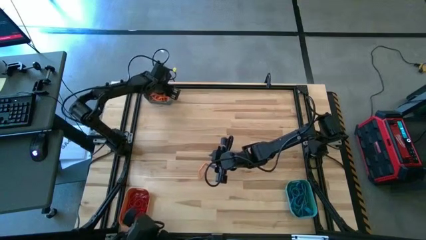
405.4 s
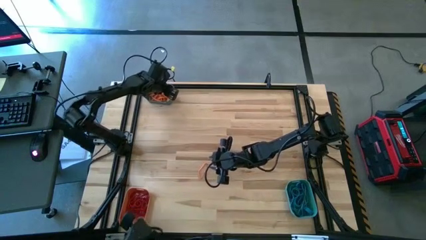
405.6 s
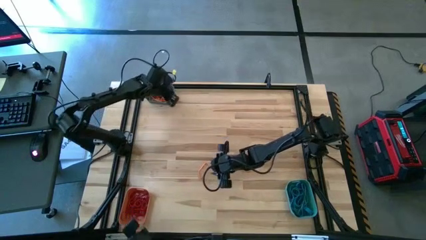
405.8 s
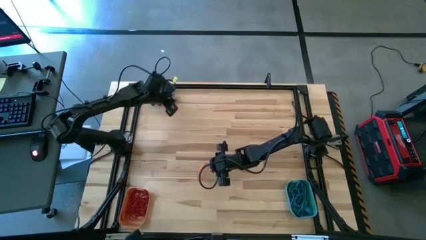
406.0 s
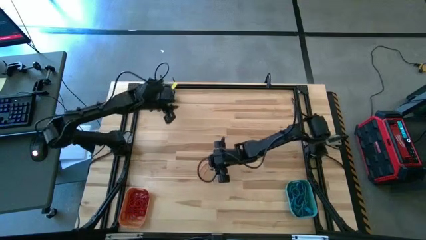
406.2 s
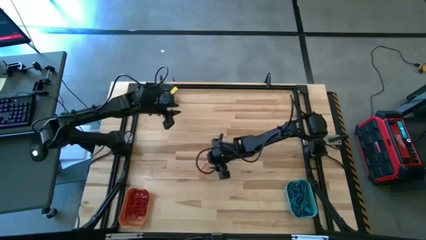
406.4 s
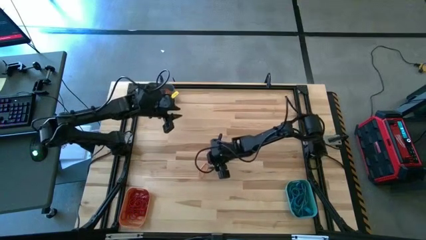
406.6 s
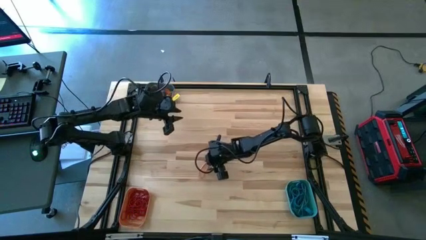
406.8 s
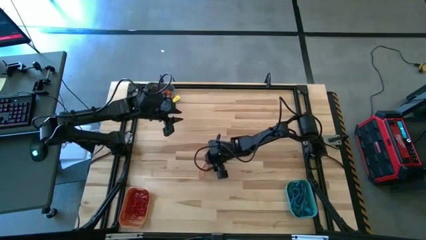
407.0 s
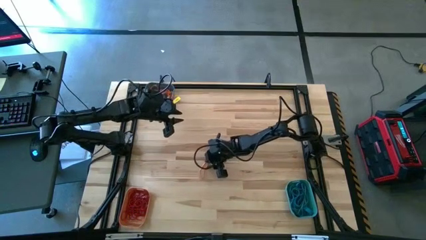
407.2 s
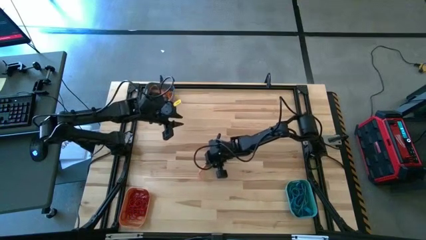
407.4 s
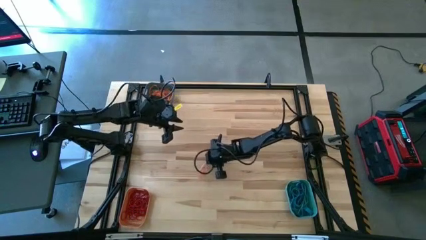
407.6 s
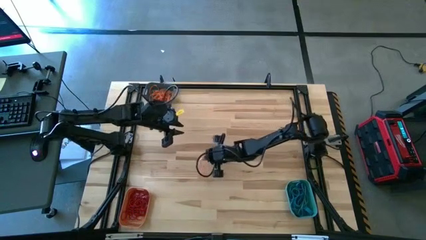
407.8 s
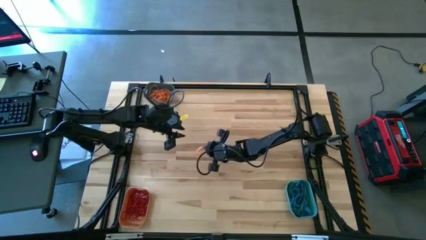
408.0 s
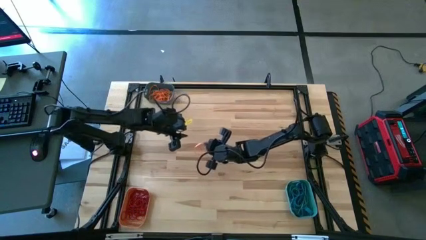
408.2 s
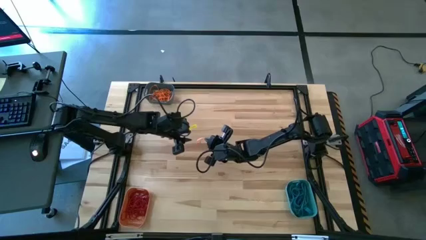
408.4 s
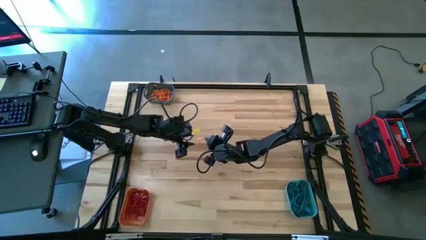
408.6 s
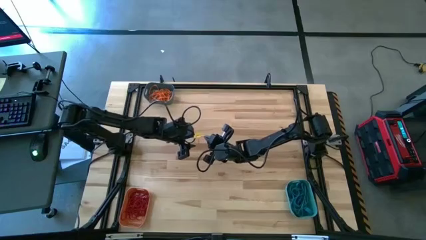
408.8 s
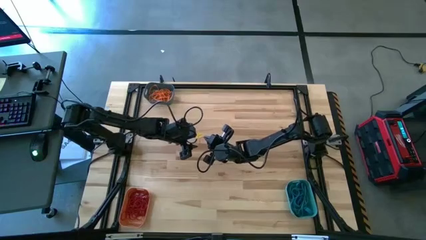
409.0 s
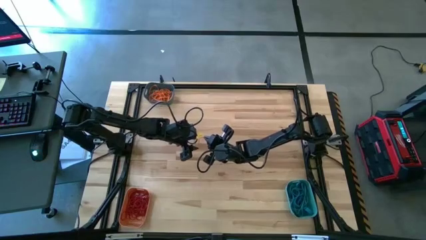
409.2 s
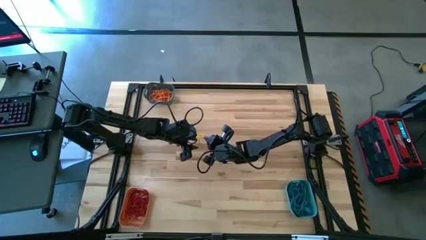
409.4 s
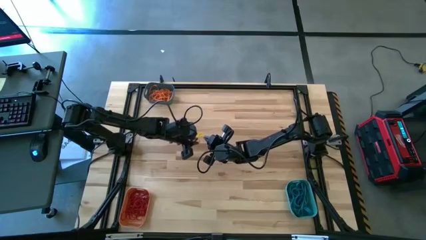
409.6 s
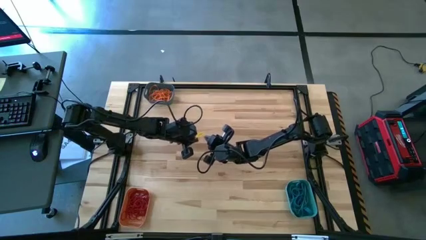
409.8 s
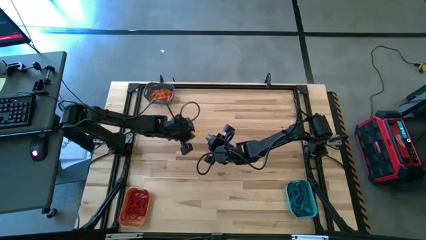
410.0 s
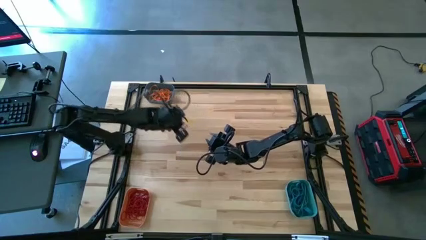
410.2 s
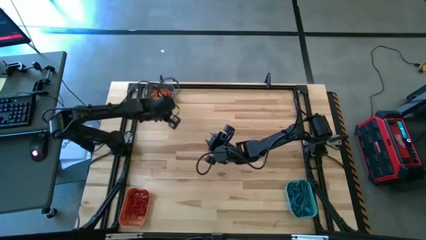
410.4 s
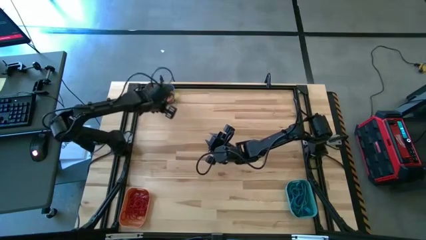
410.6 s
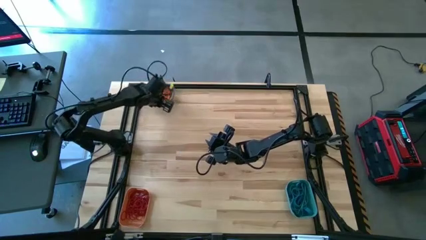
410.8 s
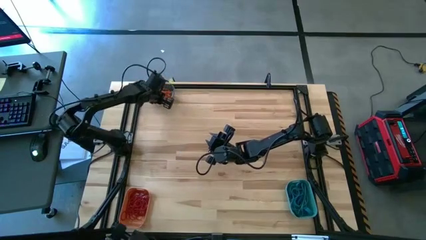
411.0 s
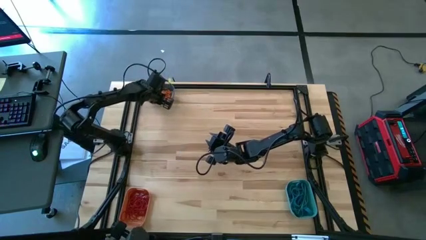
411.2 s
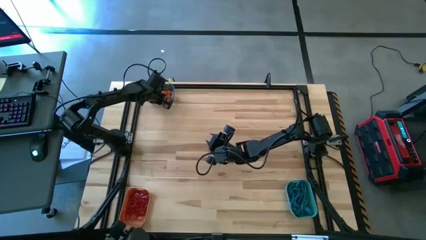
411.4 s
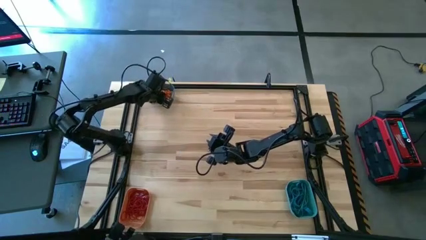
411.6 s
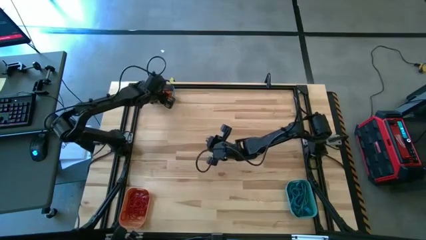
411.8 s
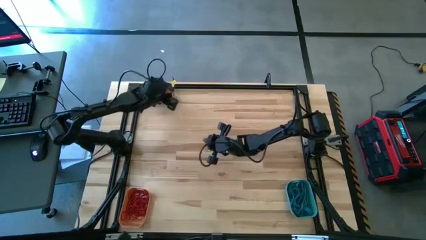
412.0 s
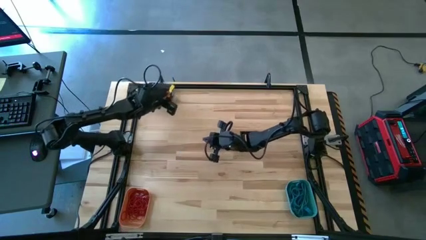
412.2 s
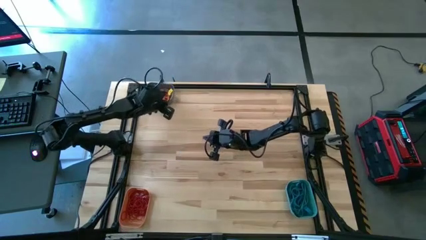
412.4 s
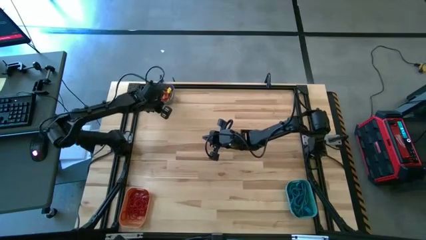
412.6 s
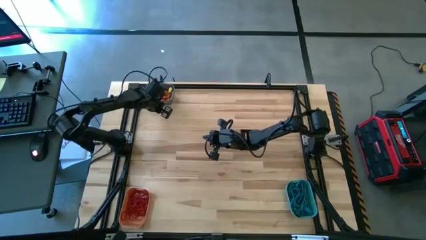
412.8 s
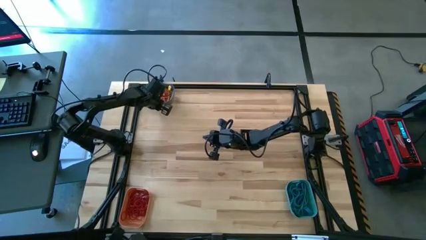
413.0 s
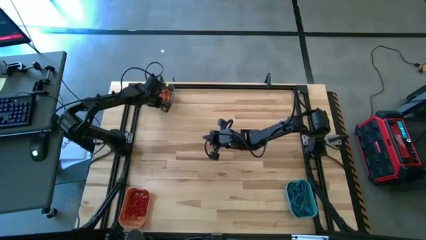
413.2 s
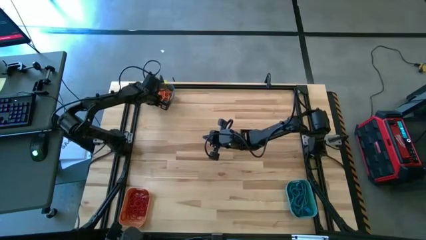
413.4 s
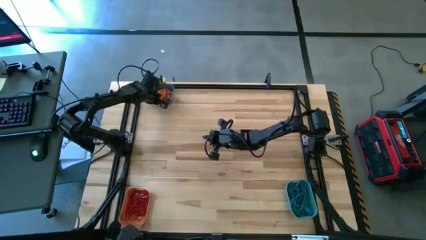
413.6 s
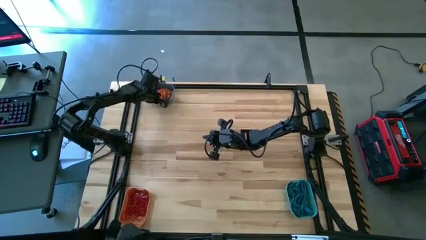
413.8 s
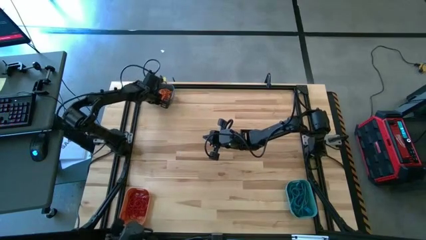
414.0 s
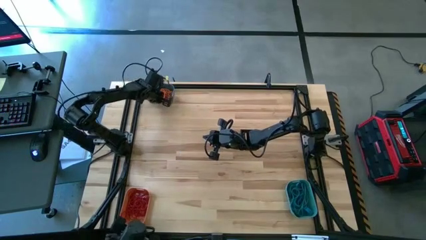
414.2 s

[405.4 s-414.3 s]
Task: Sort rubber bands into baskets
Put the orange rubber band into the blue bin

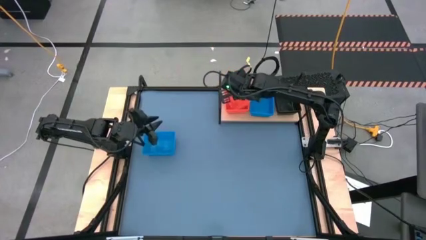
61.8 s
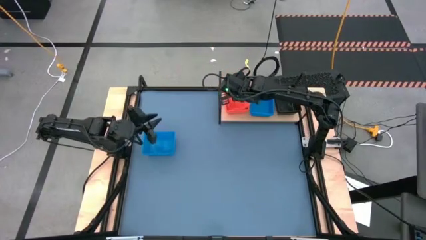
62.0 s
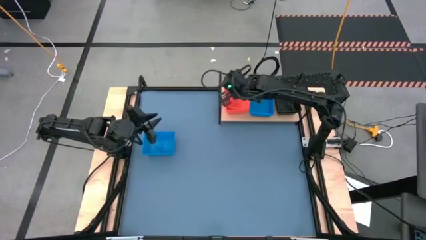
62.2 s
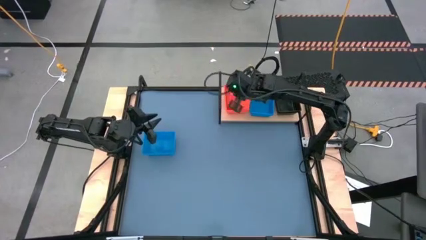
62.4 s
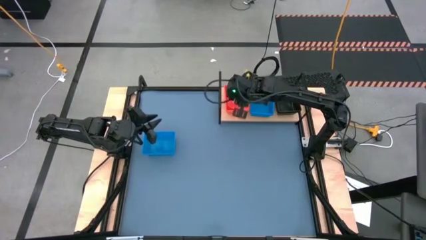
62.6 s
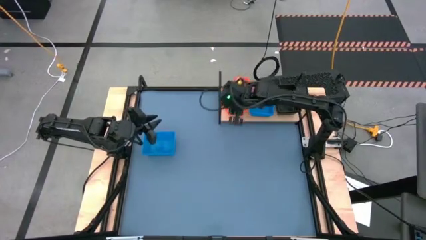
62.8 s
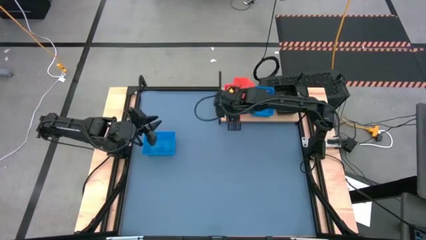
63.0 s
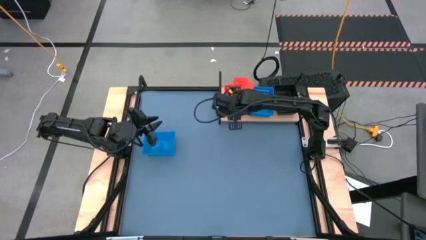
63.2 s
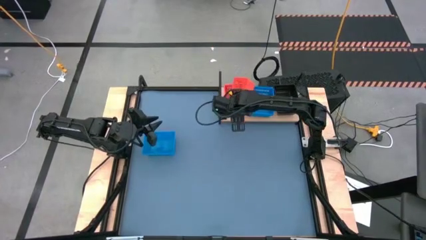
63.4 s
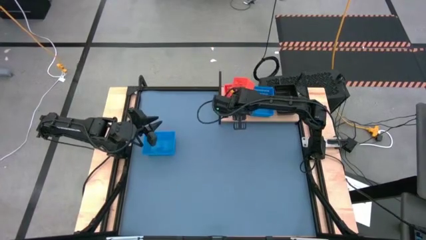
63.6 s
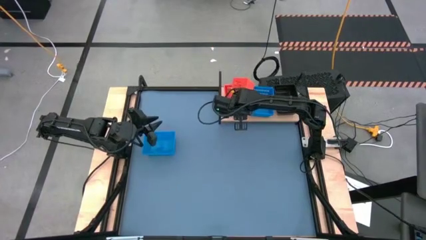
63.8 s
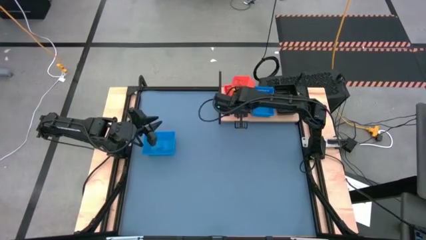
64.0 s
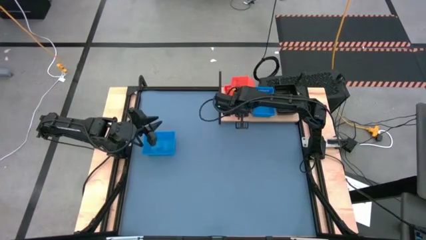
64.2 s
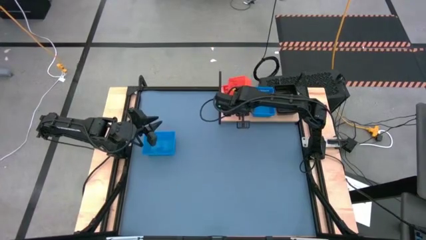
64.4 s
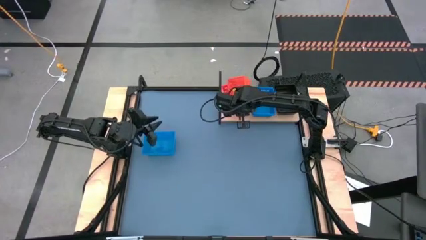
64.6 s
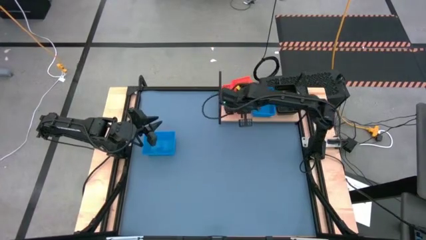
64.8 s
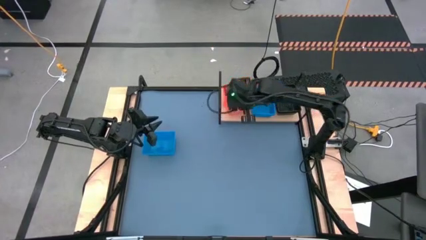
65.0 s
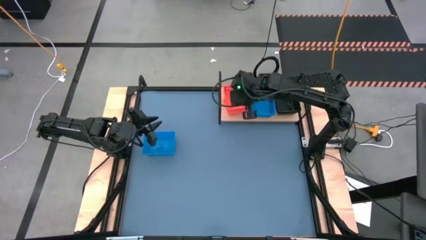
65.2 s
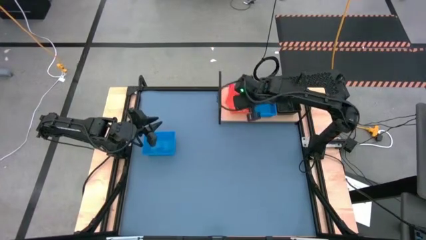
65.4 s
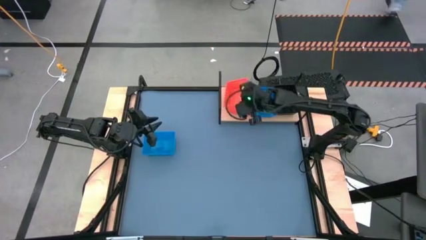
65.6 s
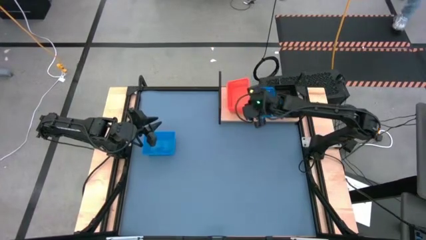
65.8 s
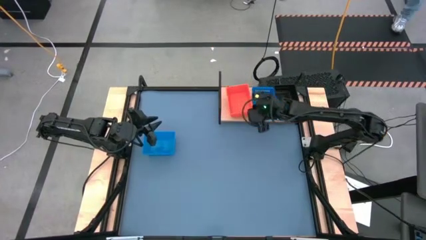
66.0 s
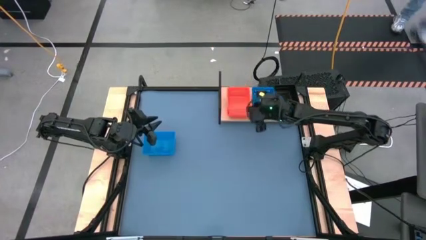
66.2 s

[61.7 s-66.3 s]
Task: Stack baskets on shelf by color
Adjust the orange basket

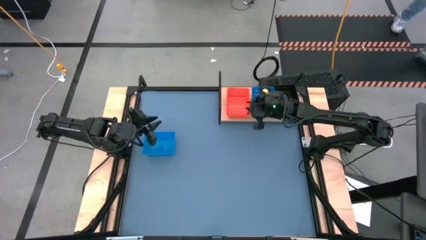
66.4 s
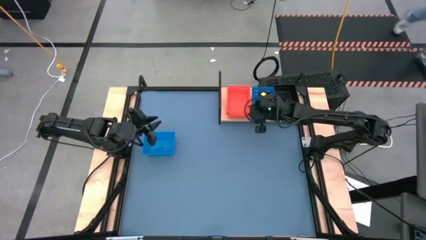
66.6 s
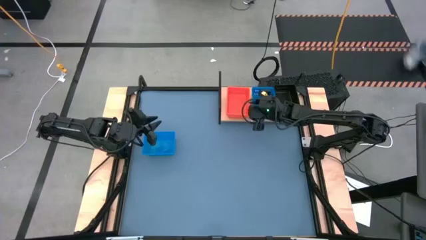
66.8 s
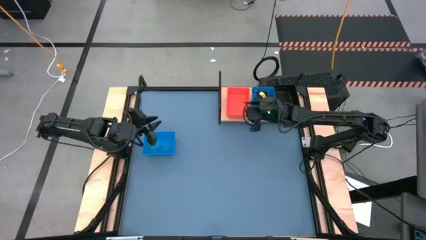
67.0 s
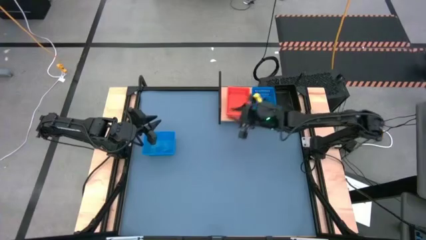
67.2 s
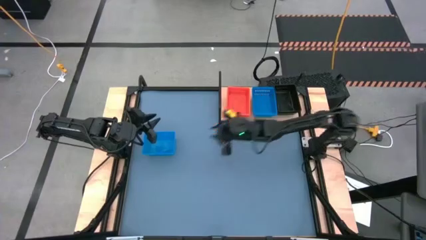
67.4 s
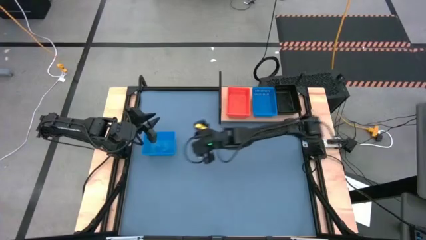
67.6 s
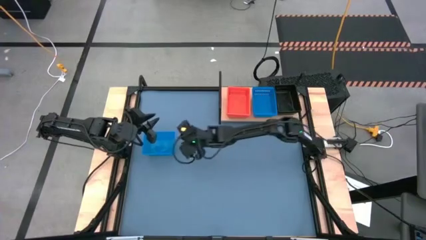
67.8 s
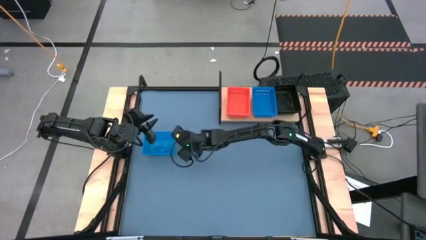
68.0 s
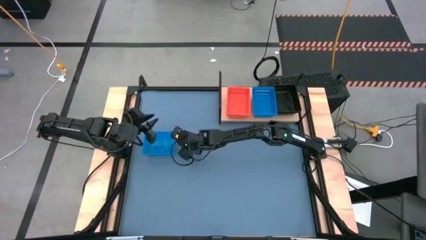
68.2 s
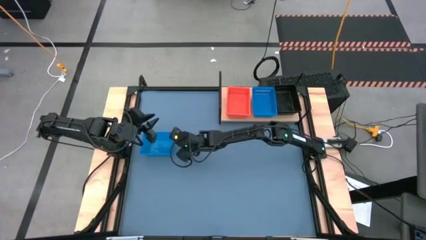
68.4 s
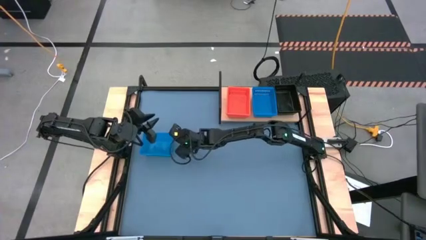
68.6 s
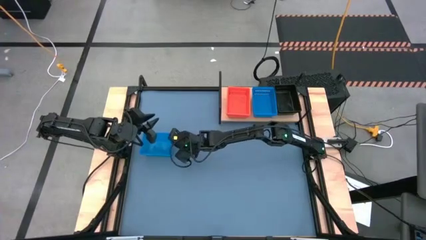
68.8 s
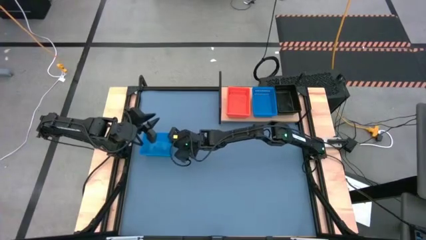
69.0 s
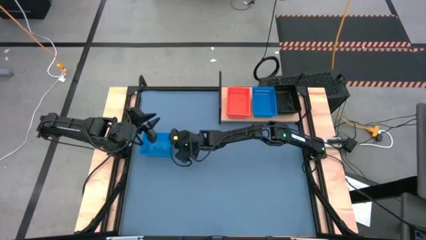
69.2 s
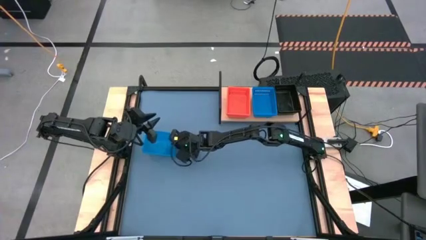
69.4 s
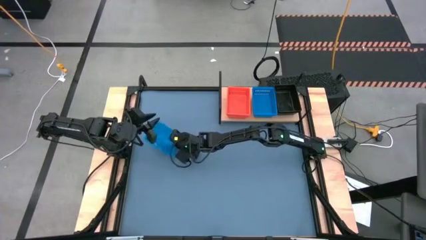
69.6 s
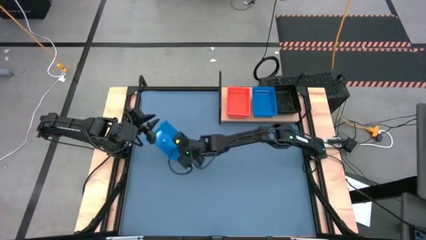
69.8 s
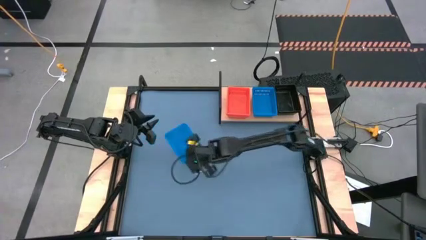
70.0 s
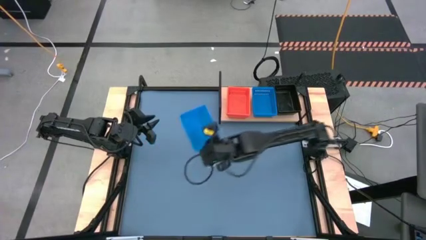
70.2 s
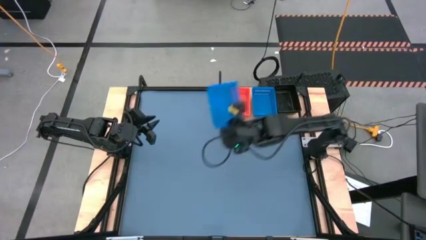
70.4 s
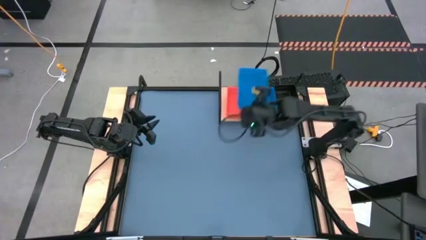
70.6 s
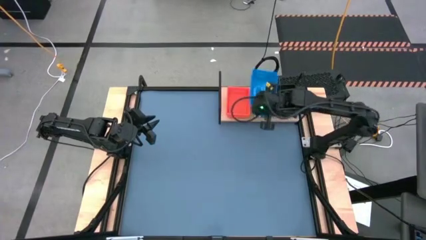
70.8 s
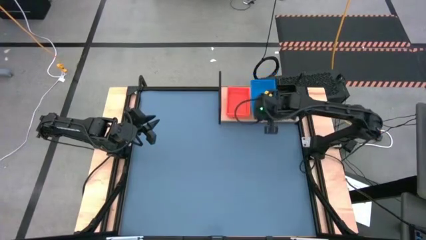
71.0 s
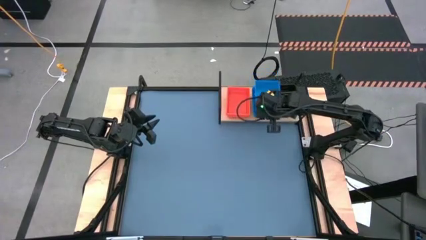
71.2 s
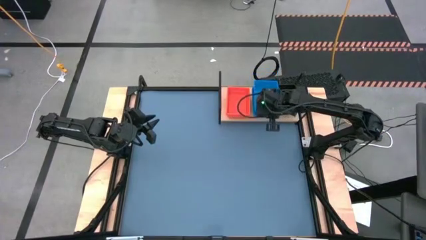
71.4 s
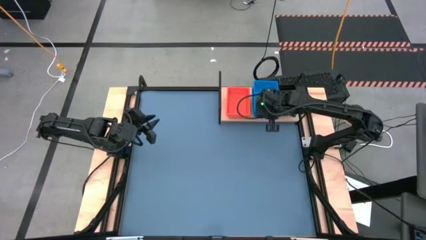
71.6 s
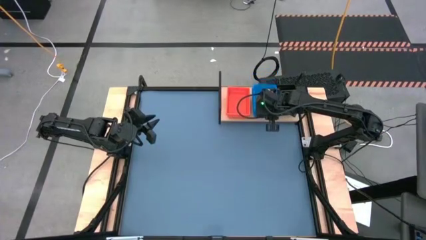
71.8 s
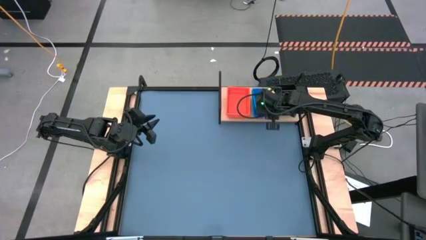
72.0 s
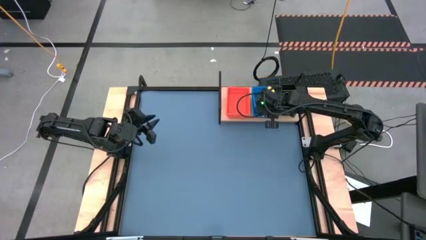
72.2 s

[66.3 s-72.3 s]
Put the blue basket on the shelf
